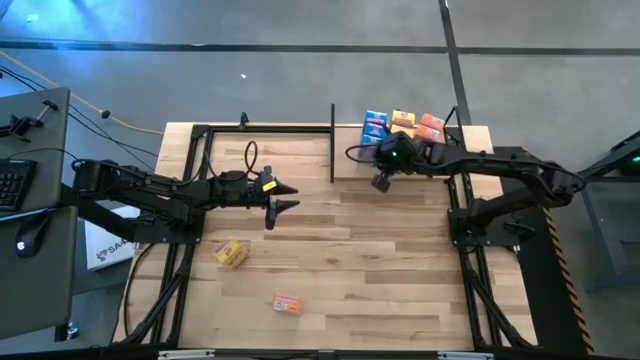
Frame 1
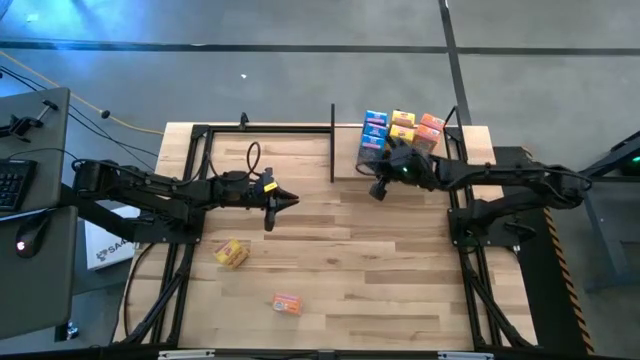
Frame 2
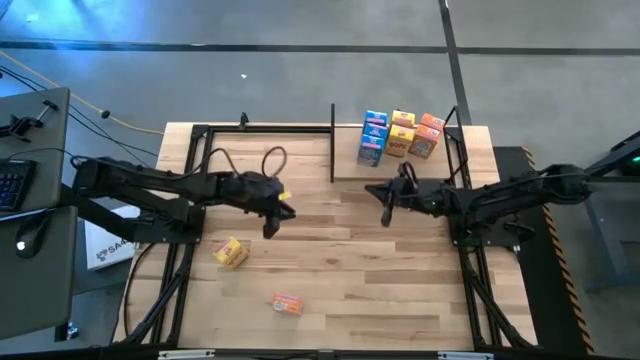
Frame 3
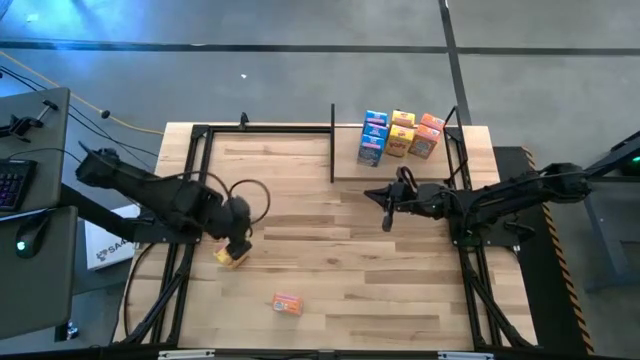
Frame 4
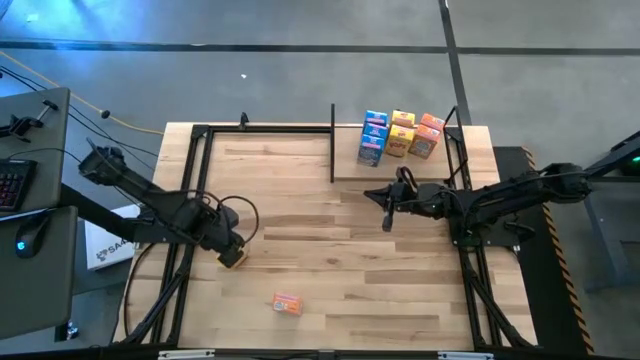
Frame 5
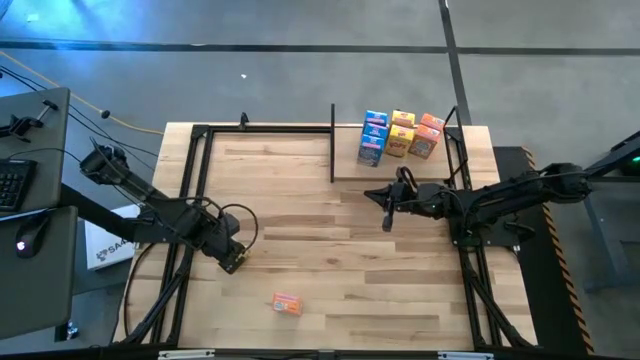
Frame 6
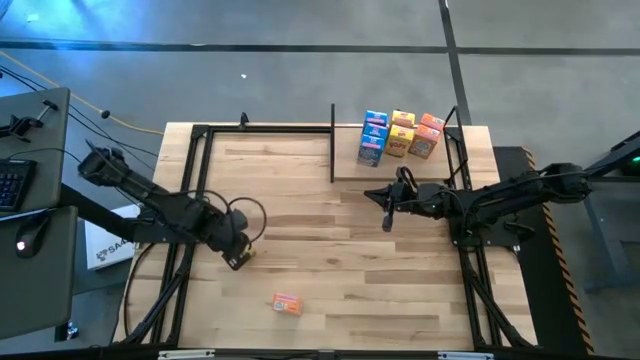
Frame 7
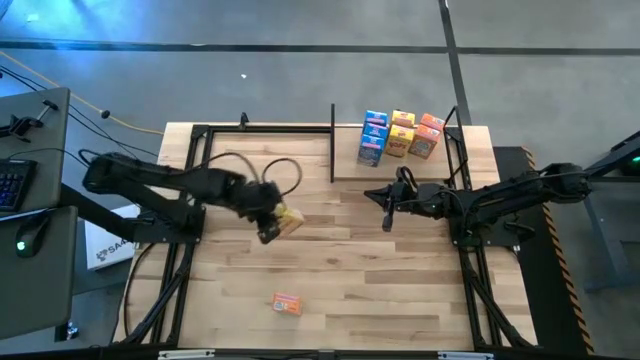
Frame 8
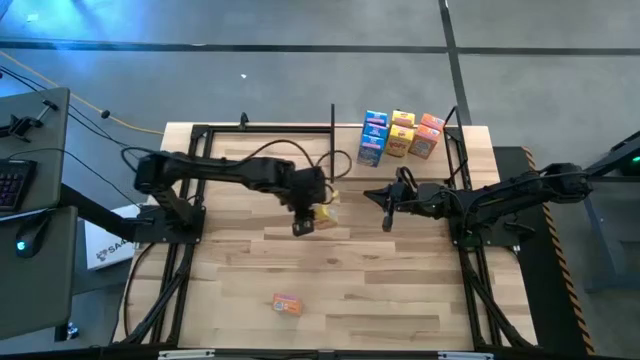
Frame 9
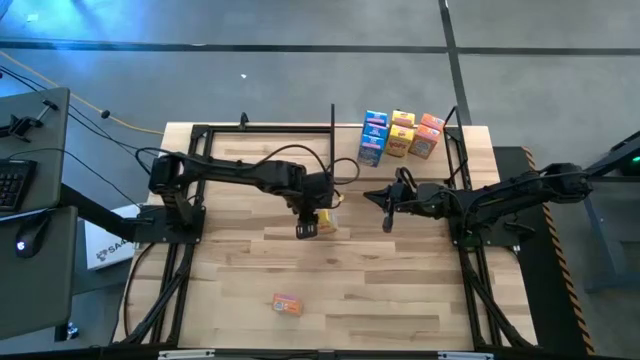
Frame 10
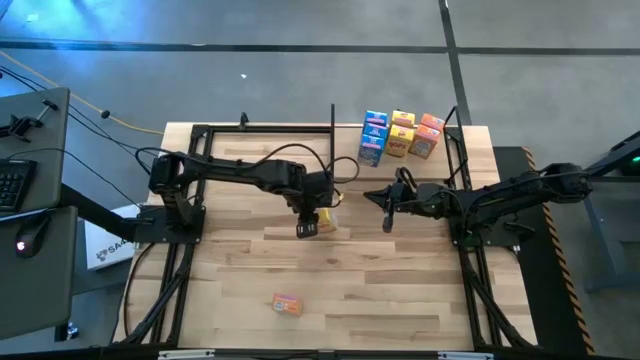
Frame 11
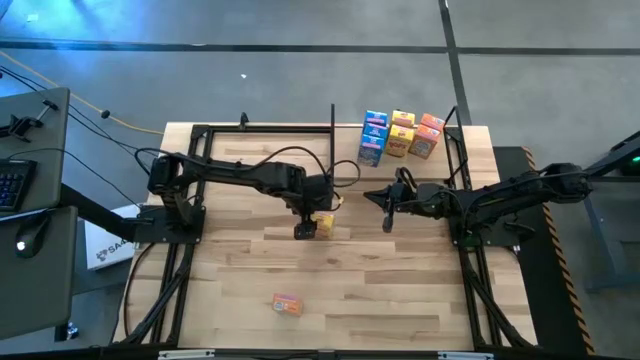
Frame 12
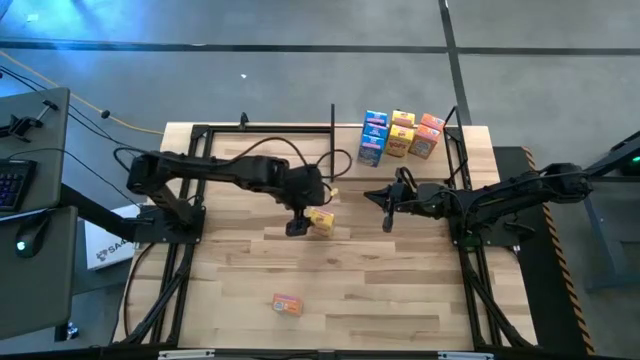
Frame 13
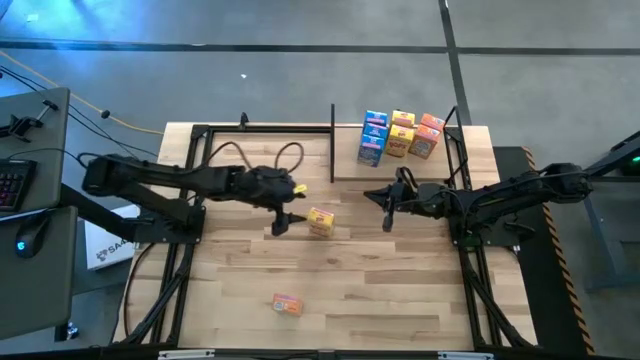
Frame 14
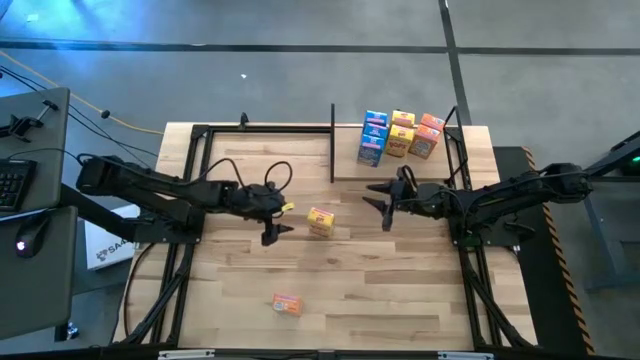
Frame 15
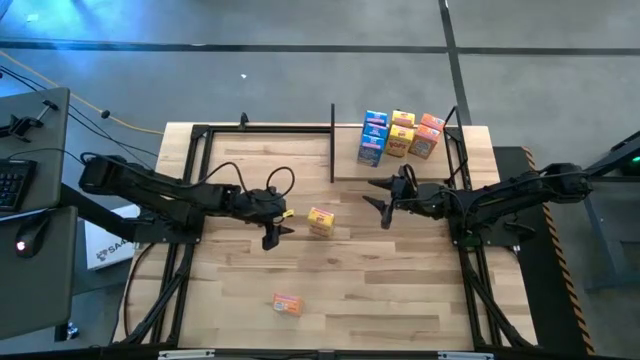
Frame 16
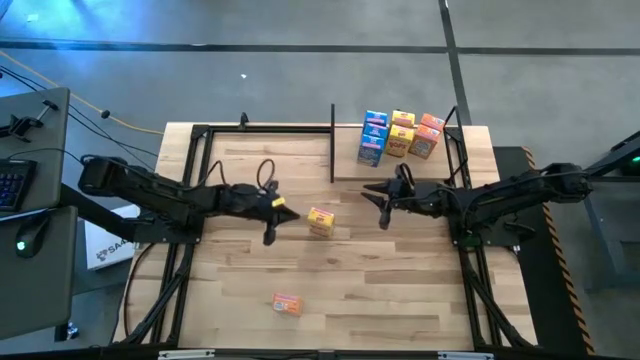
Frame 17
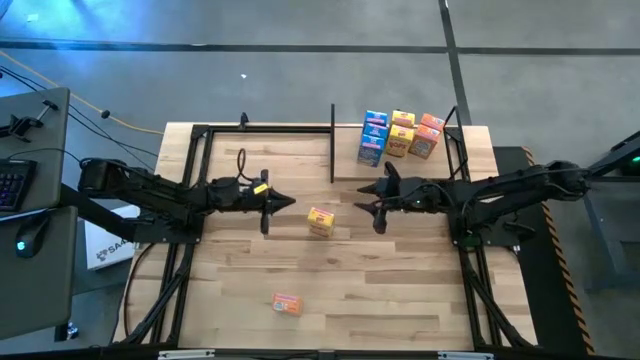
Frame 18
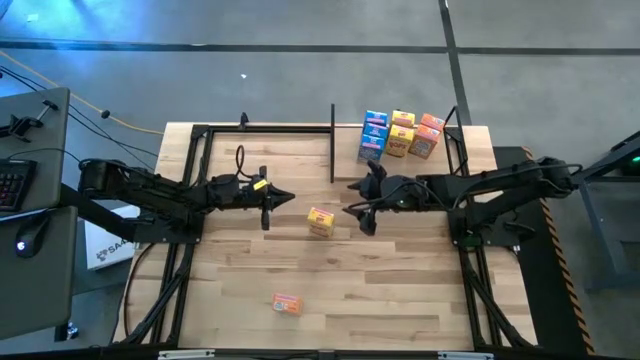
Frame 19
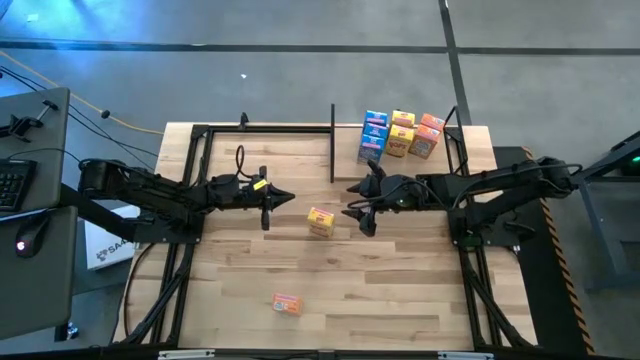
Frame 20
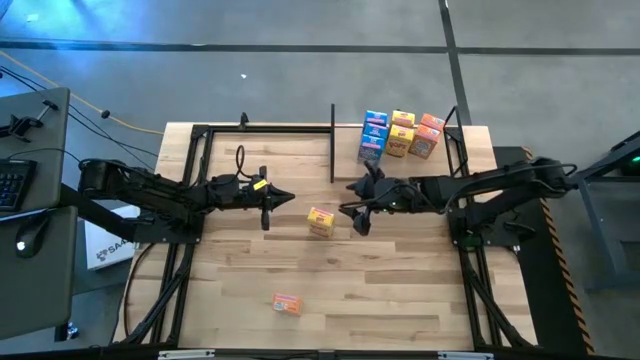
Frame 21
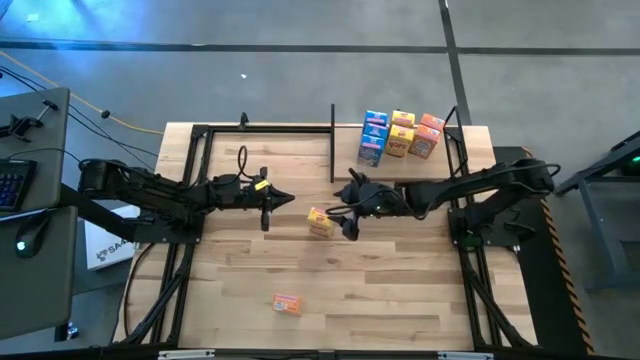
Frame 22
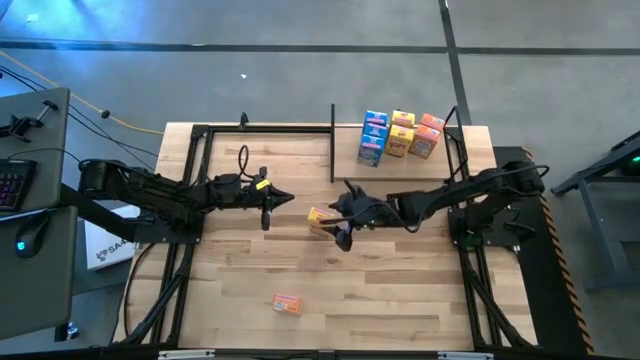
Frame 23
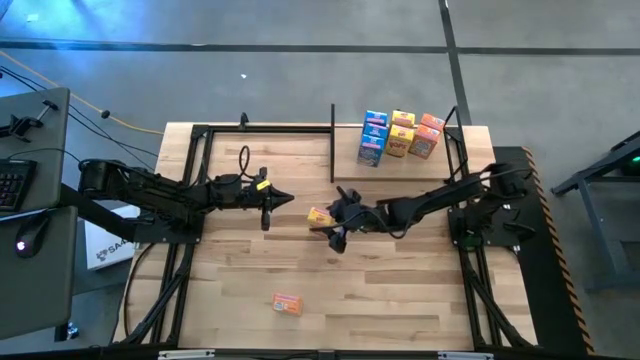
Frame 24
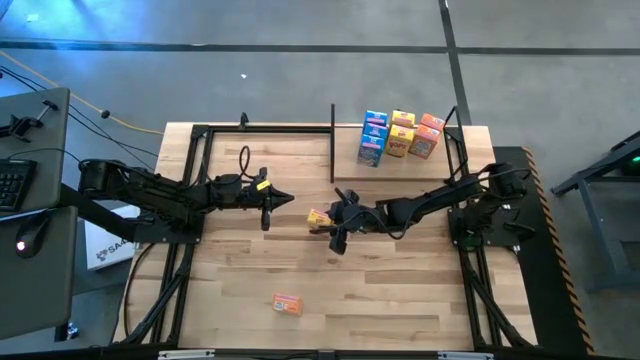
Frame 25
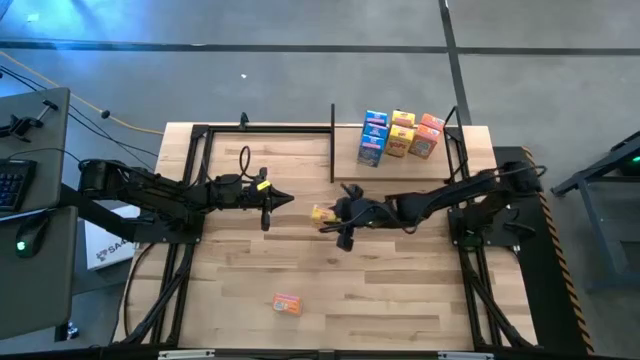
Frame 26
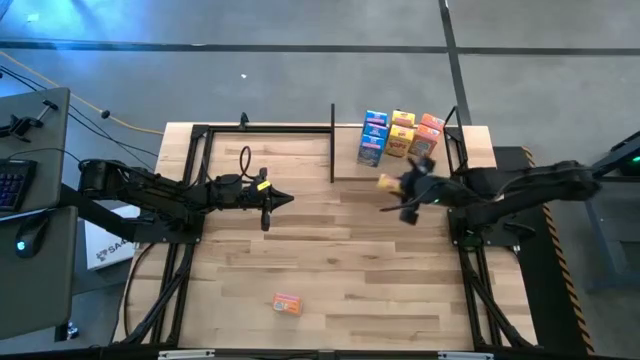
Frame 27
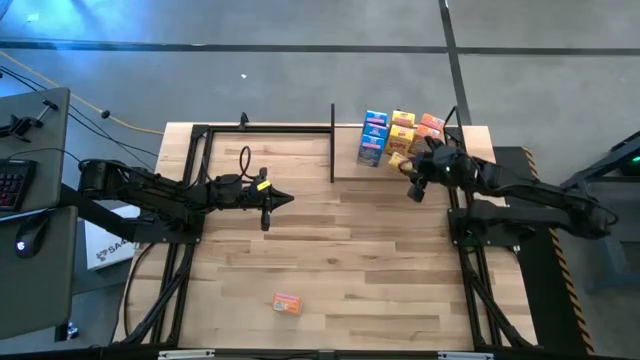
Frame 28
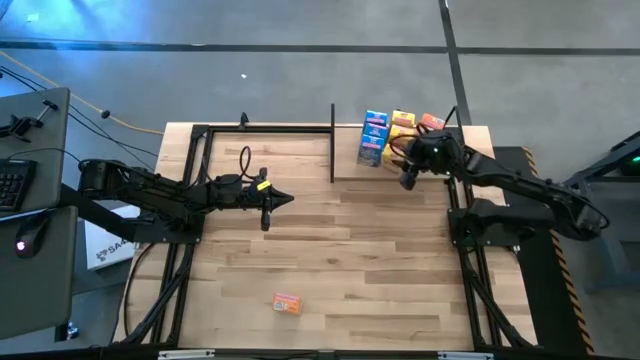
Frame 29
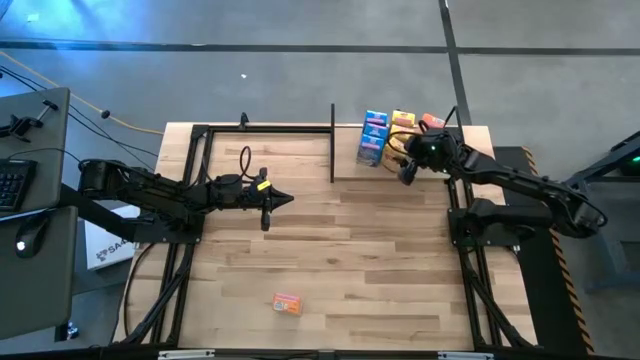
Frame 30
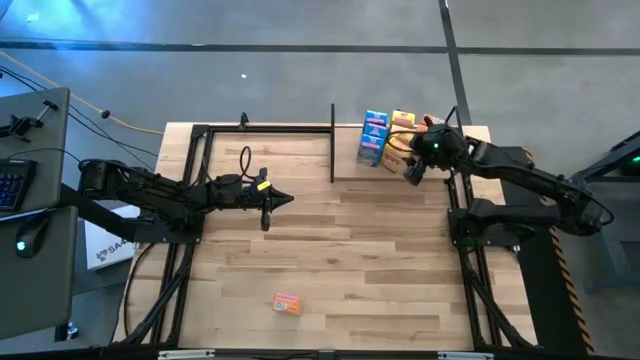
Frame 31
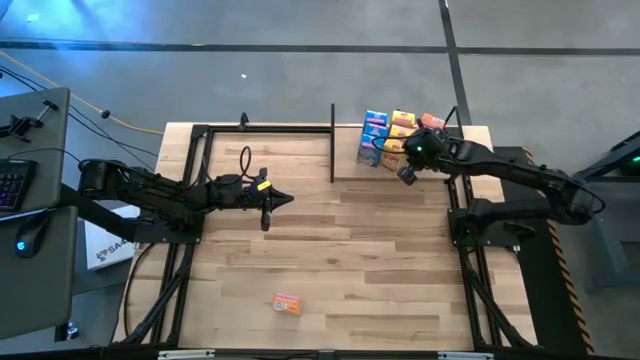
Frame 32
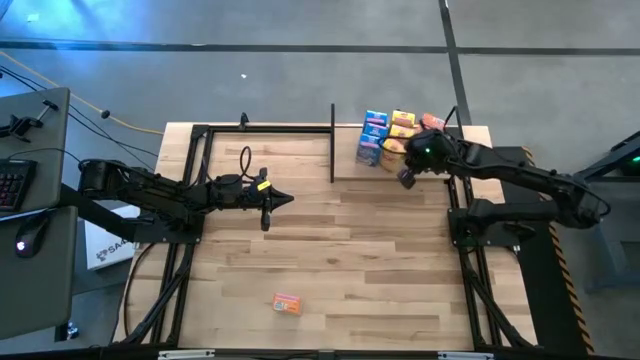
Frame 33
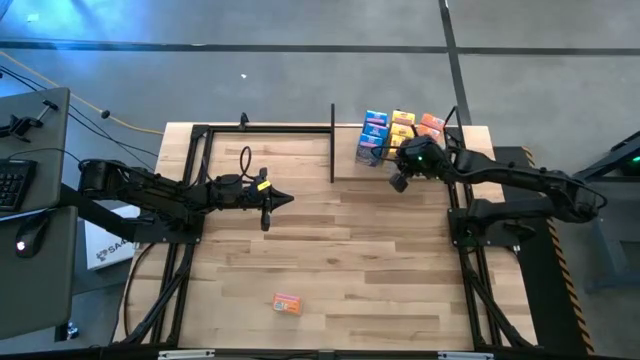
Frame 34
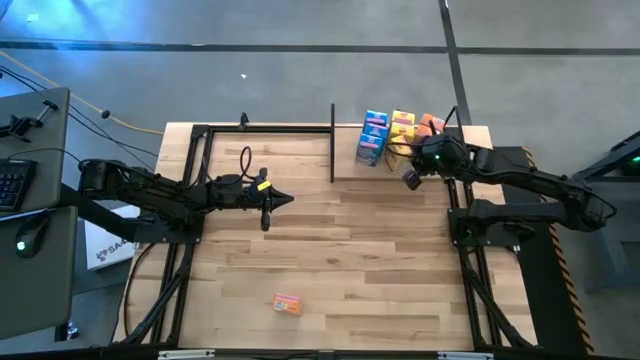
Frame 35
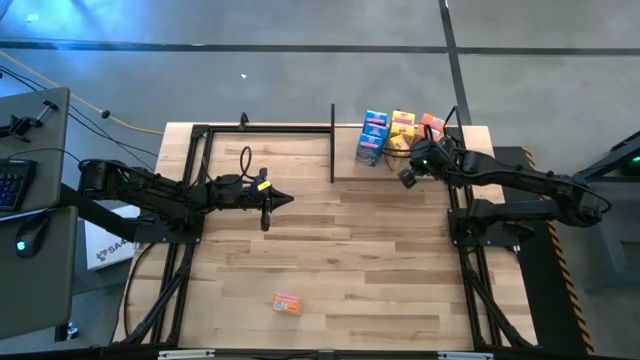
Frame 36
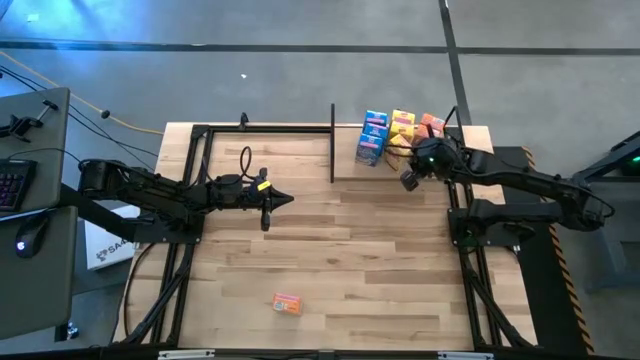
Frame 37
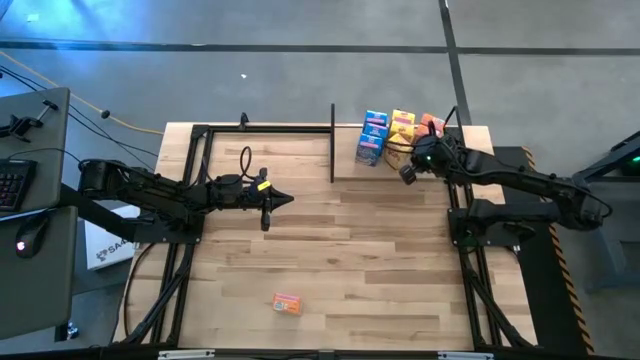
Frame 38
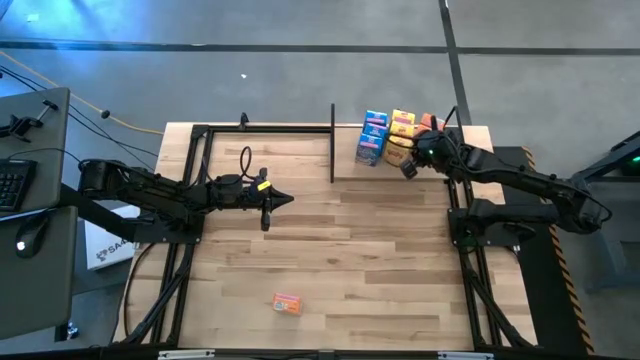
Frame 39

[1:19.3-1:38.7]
Task: Stack cereal on shelf
Put the yellow cereal box on the shelf aligned with the other blue cereal box

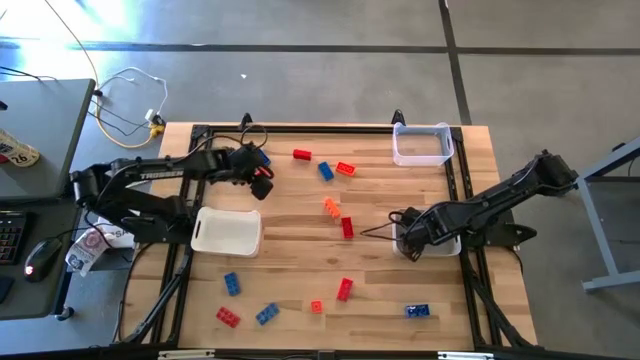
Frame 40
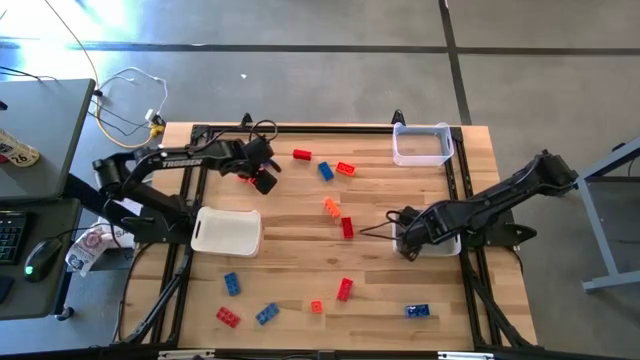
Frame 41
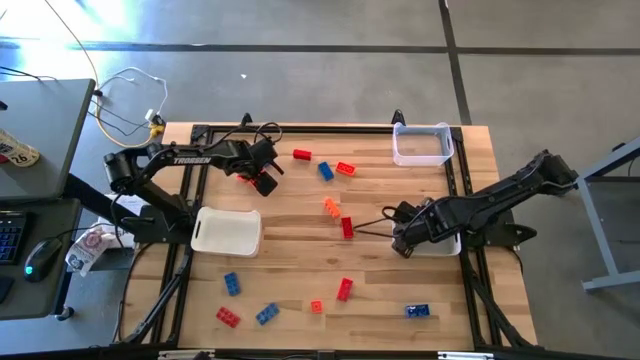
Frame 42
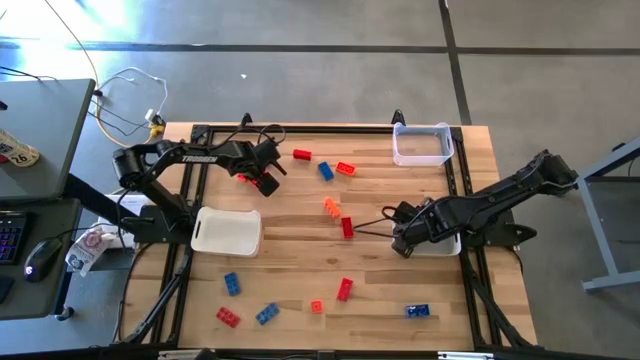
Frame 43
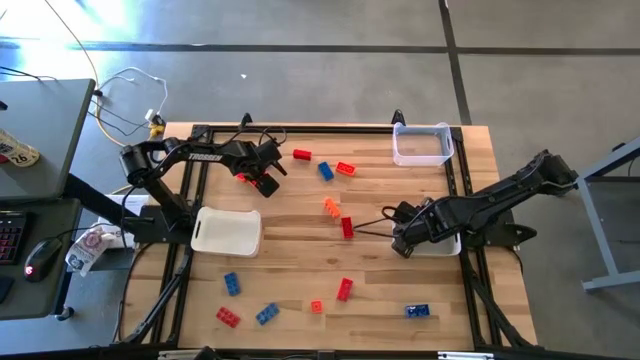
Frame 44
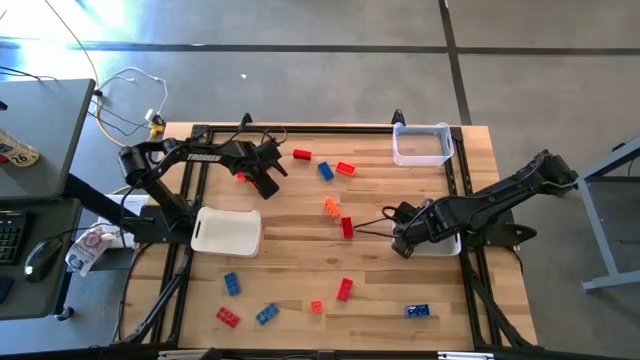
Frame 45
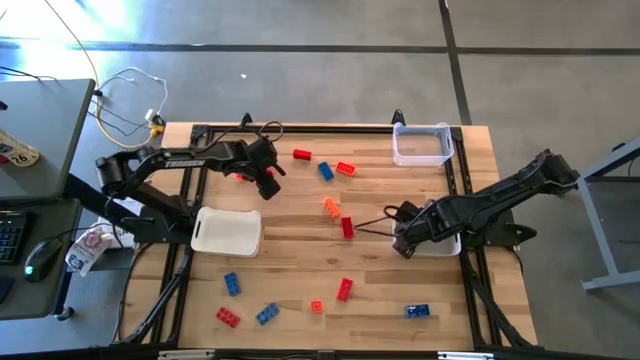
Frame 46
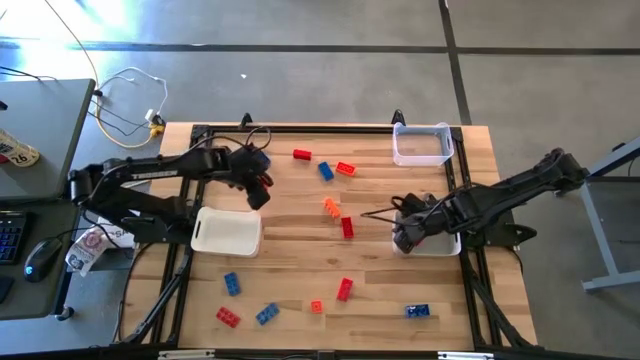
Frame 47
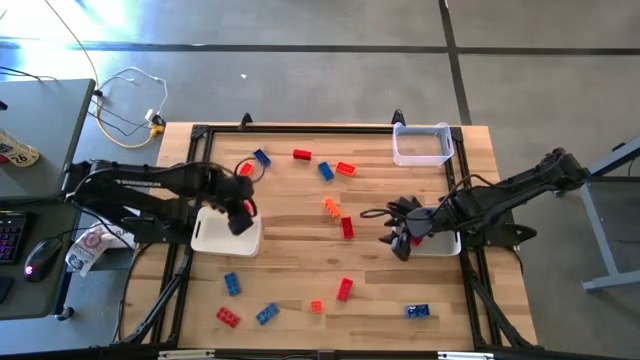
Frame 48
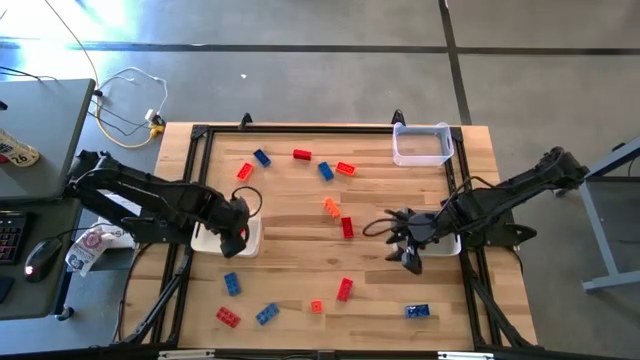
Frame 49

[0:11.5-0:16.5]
Task: Sort & place blocks by color
Put the orange game piece into the white bin
